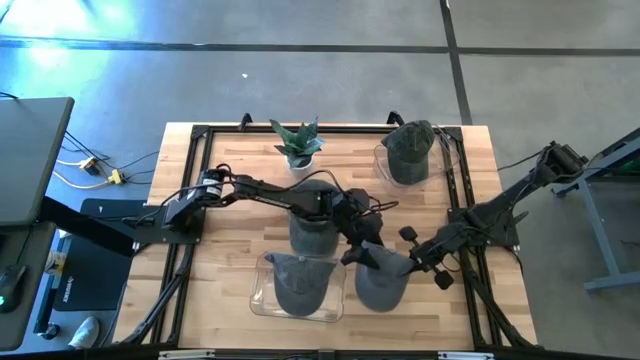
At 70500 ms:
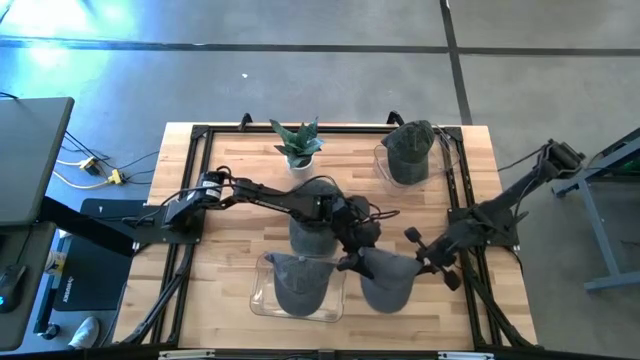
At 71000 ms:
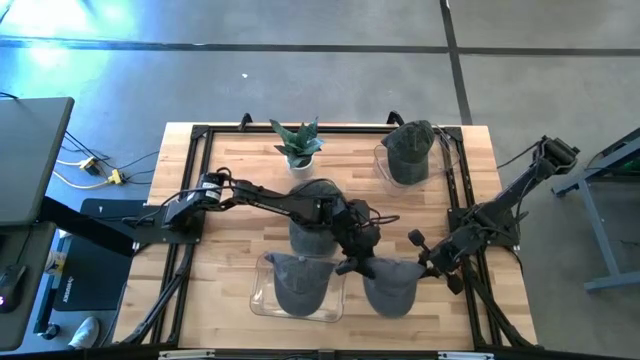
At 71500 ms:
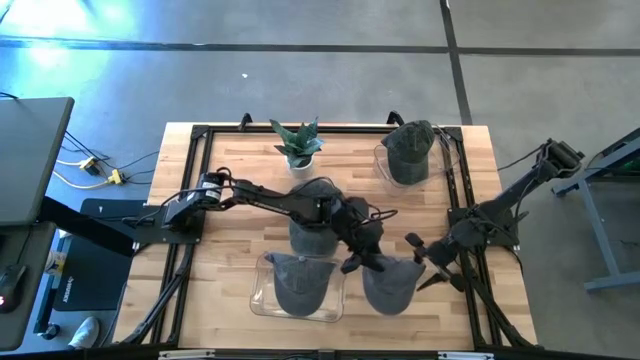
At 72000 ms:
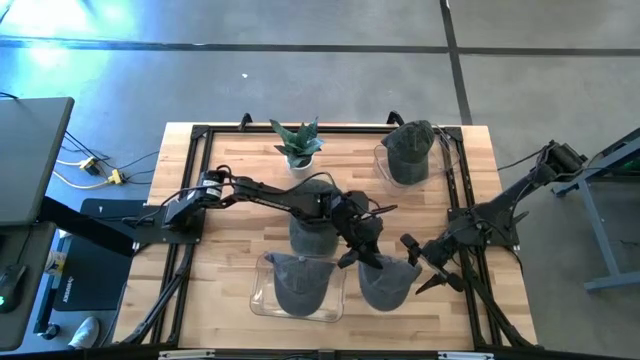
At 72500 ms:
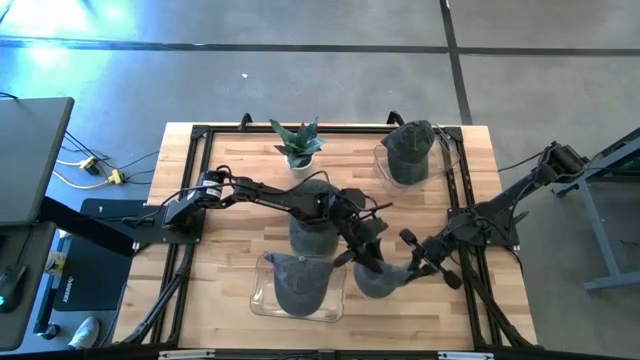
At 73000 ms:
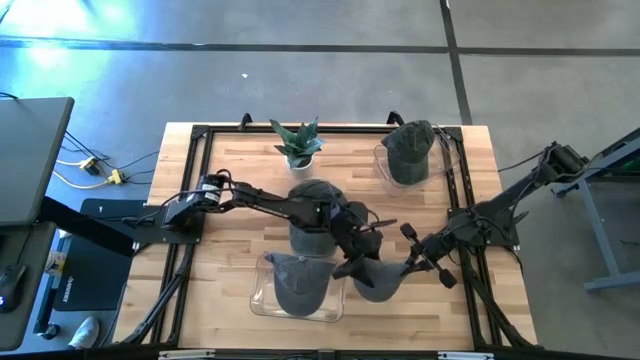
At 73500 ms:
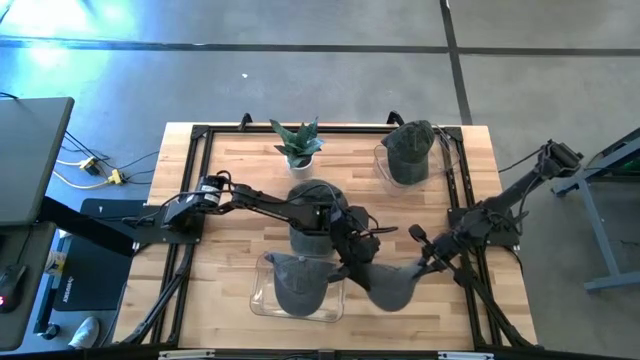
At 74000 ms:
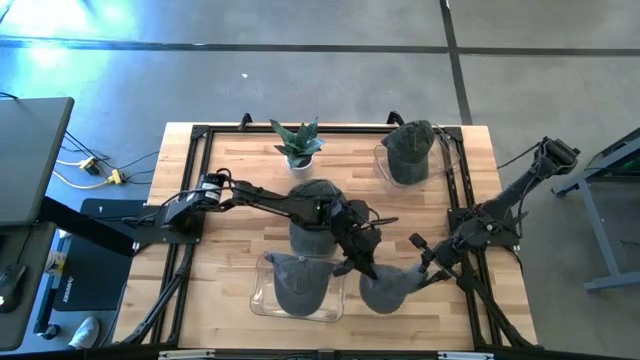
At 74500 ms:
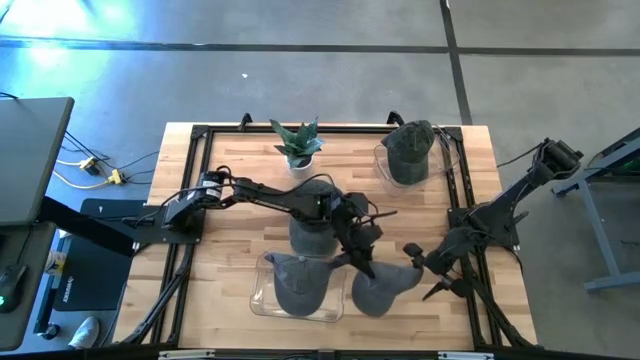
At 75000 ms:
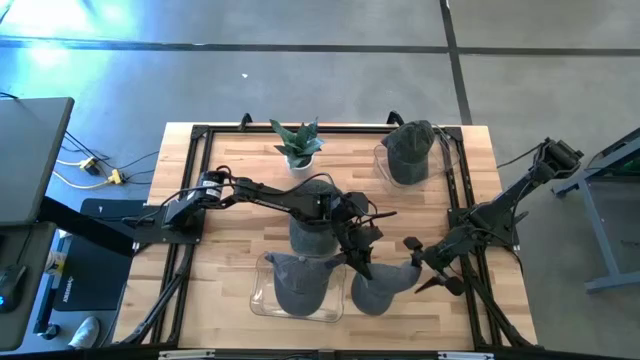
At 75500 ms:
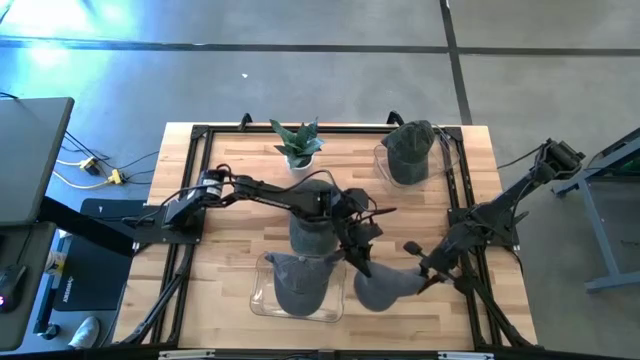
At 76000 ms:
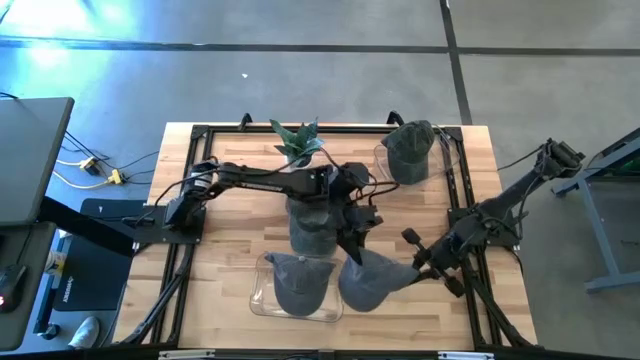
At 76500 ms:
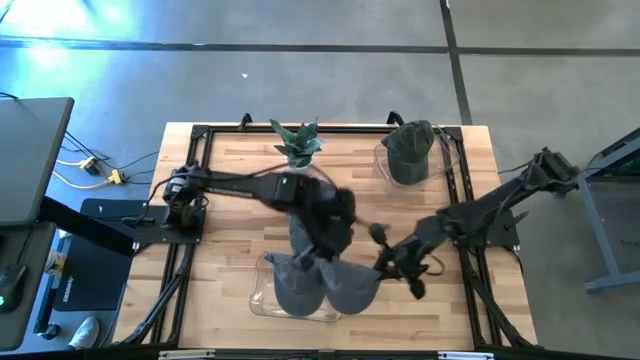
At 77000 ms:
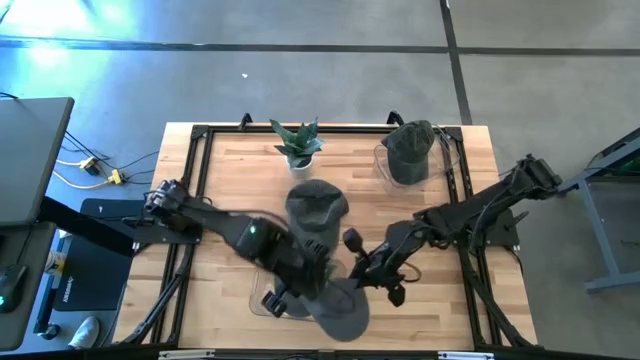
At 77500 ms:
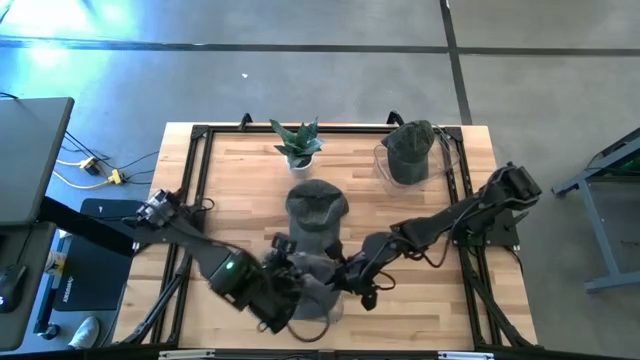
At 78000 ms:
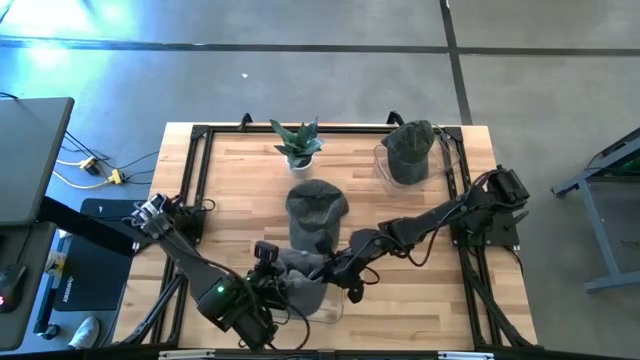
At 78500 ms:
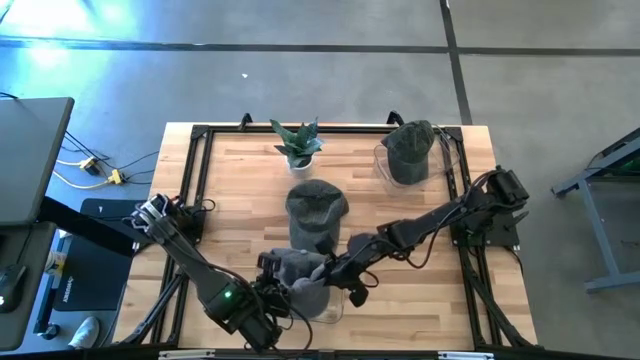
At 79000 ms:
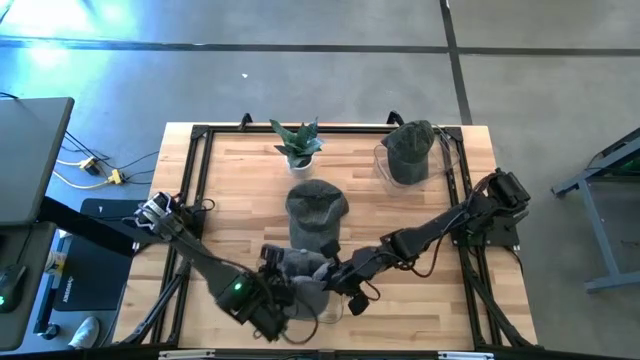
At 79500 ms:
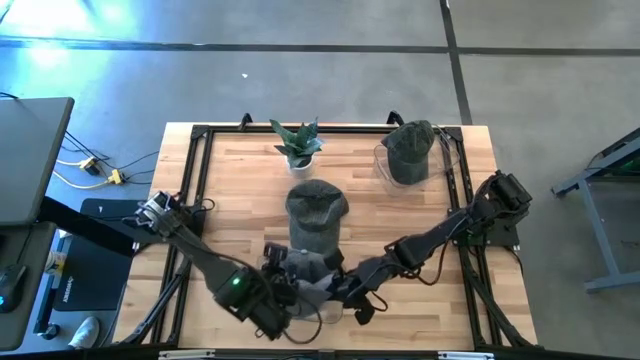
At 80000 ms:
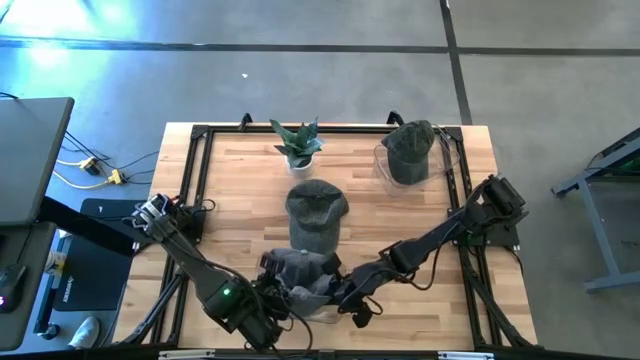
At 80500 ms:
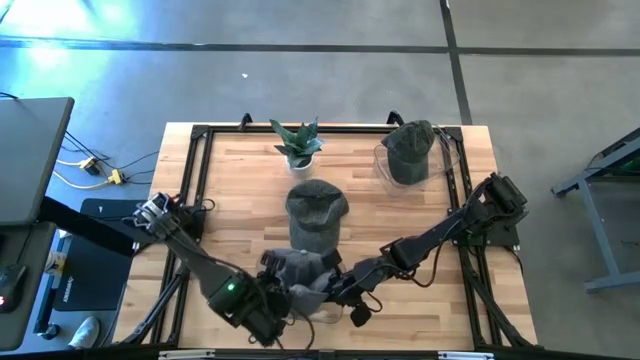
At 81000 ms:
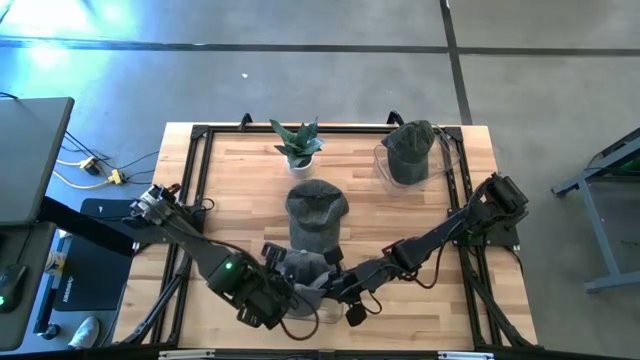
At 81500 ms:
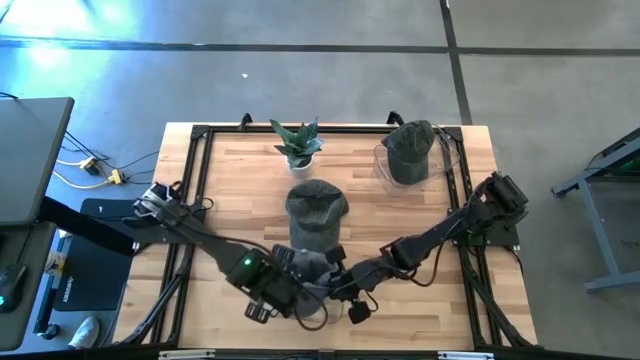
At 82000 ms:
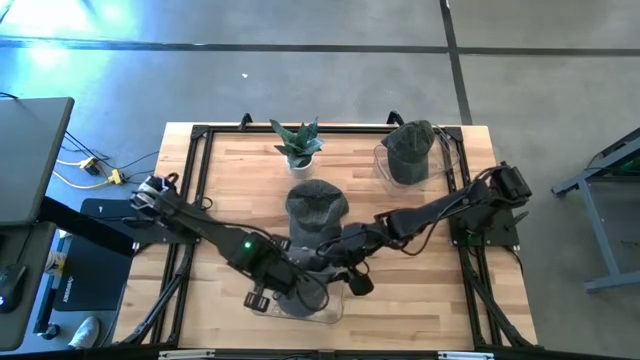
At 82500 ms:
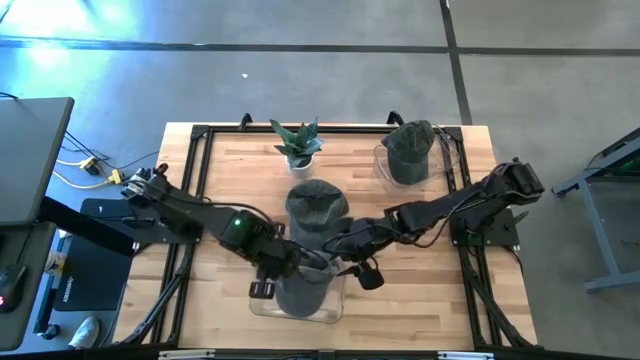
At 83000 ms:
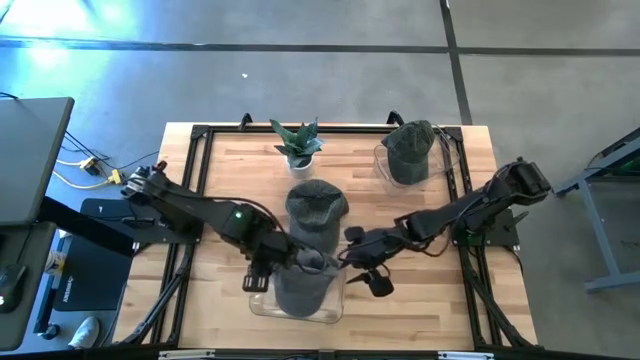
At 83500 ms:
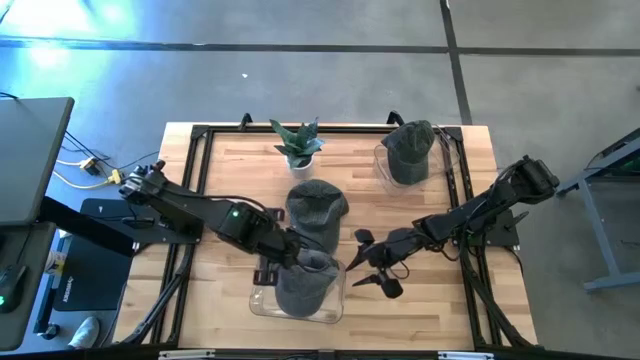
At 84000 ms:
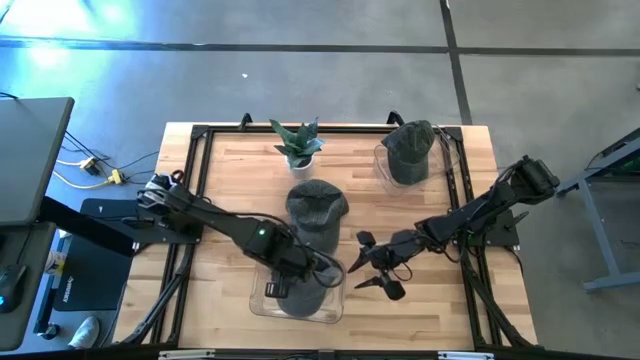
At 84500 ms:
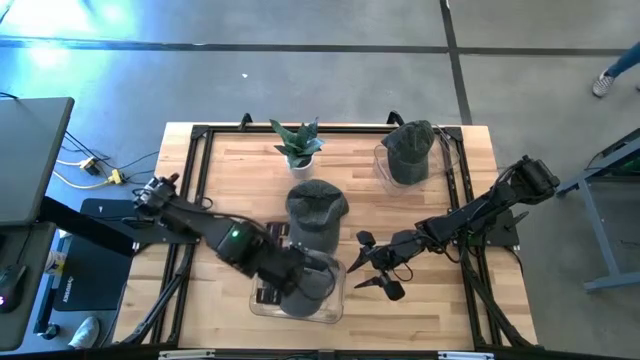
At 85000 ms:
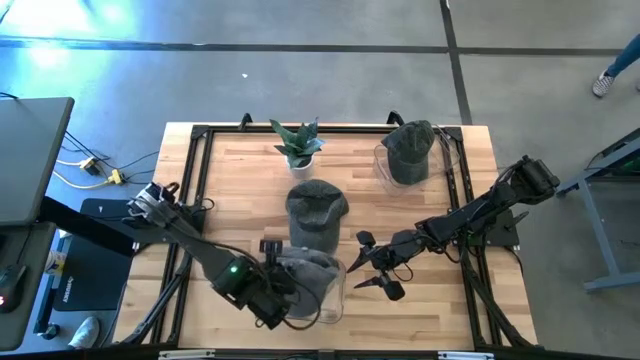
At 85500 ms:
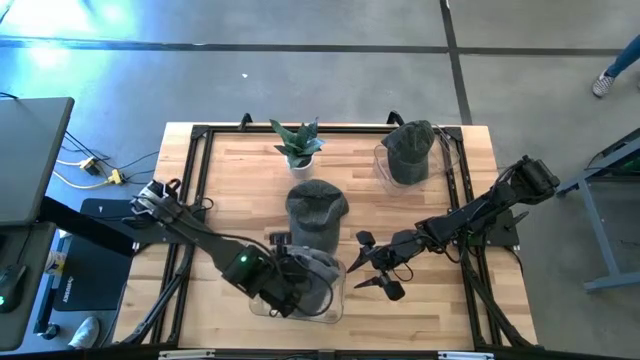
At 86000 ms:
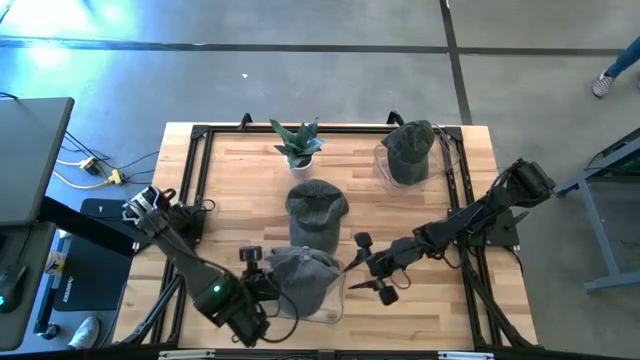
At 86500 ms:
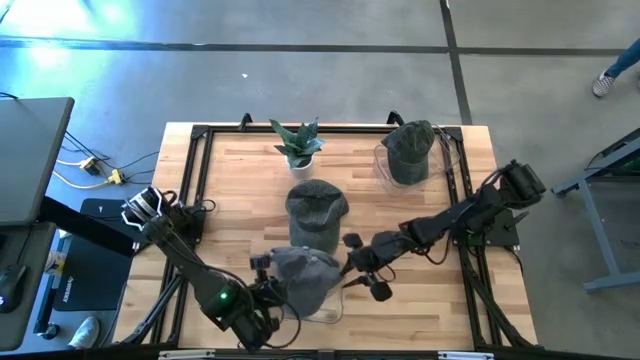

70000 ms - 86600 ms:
Task: Pick & Place hat
Put the gray cap into the bottom transparent bin
